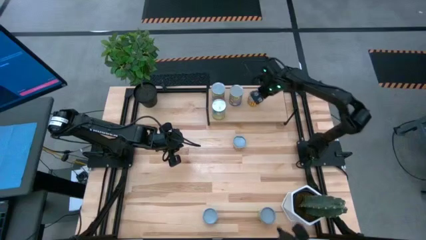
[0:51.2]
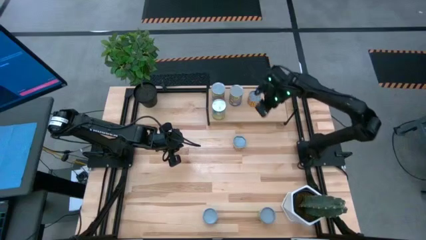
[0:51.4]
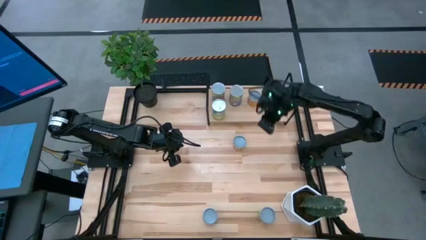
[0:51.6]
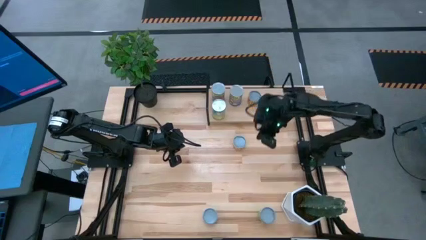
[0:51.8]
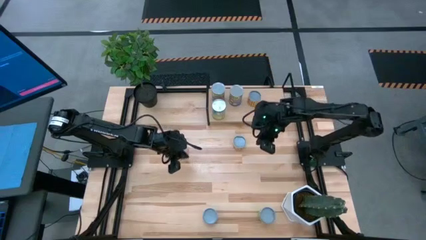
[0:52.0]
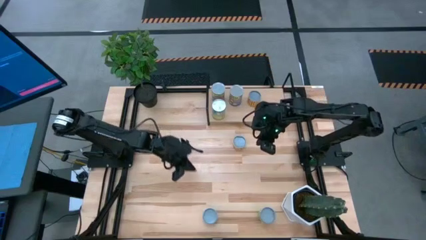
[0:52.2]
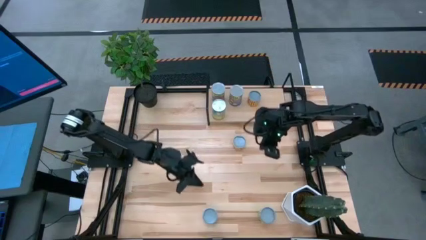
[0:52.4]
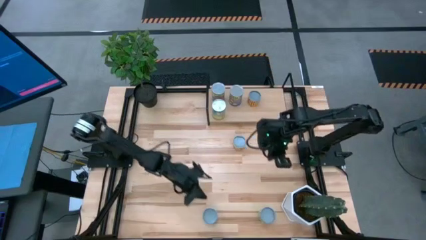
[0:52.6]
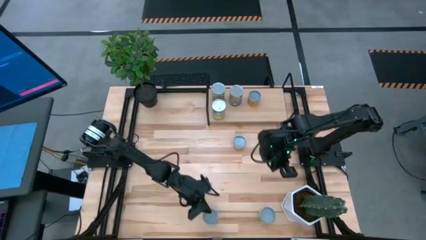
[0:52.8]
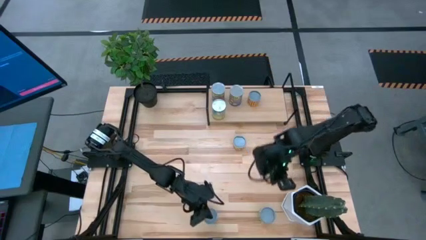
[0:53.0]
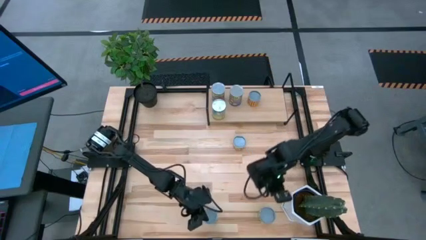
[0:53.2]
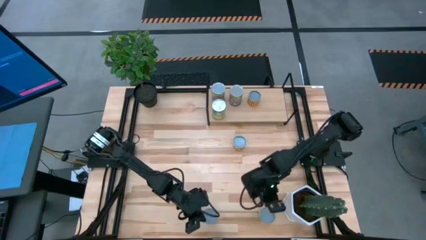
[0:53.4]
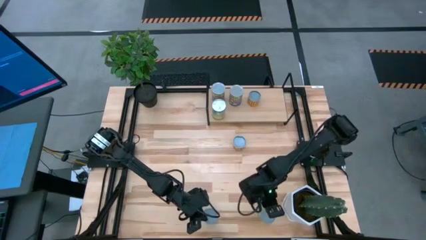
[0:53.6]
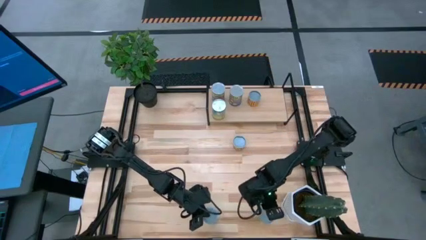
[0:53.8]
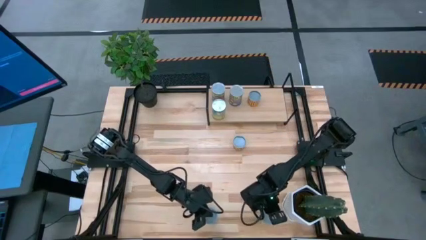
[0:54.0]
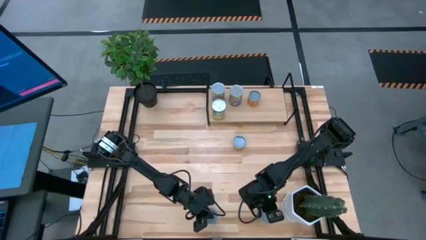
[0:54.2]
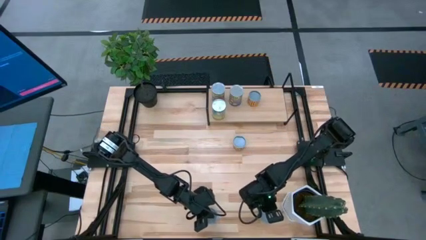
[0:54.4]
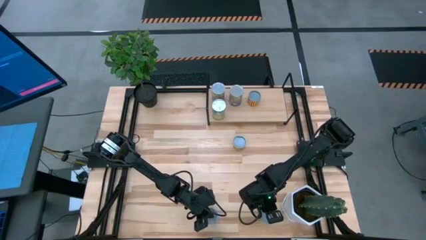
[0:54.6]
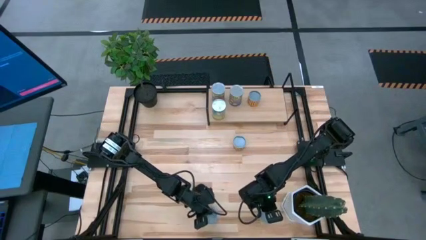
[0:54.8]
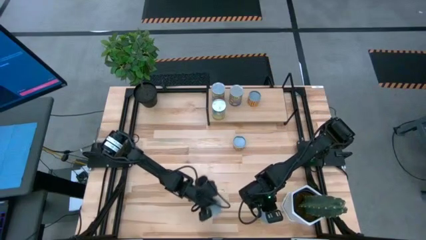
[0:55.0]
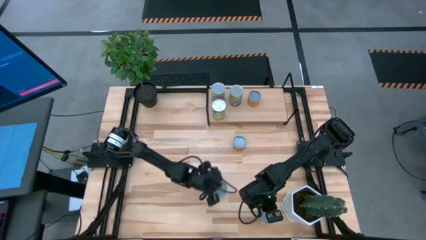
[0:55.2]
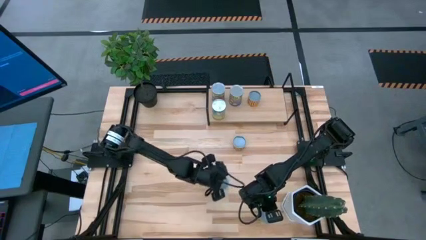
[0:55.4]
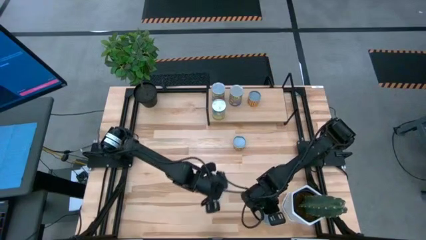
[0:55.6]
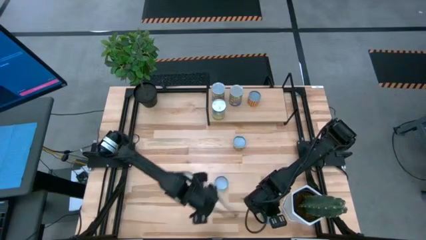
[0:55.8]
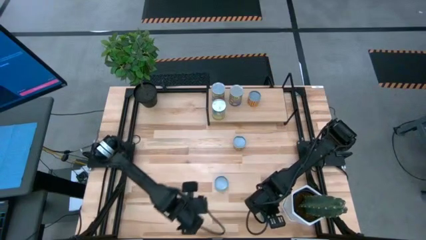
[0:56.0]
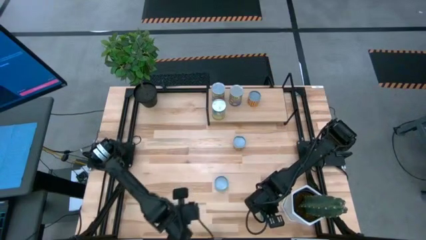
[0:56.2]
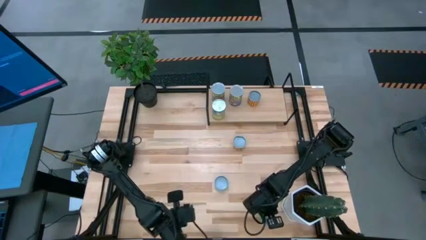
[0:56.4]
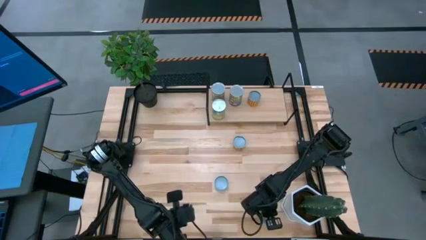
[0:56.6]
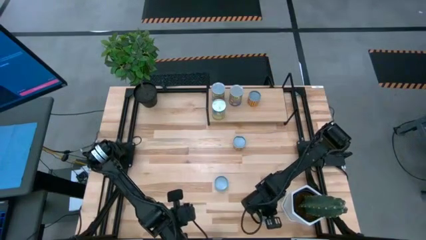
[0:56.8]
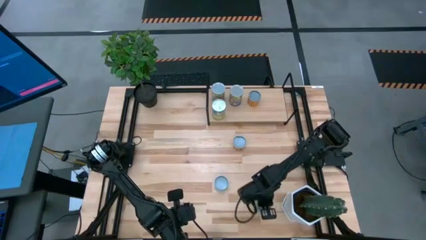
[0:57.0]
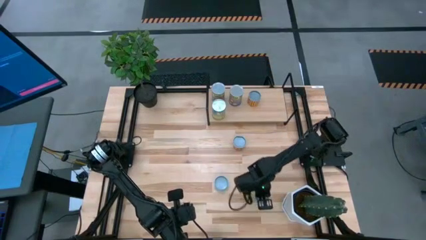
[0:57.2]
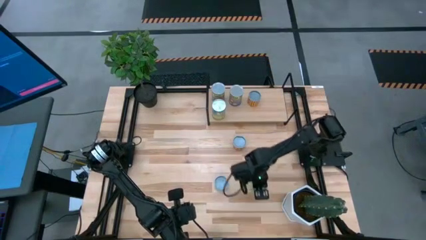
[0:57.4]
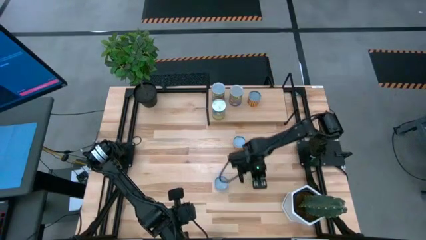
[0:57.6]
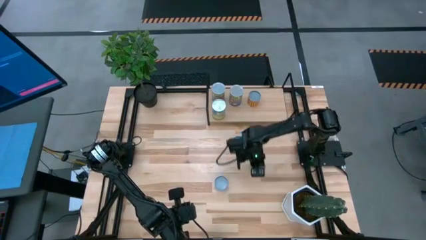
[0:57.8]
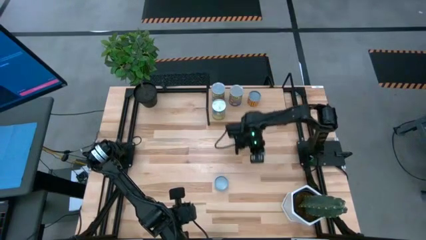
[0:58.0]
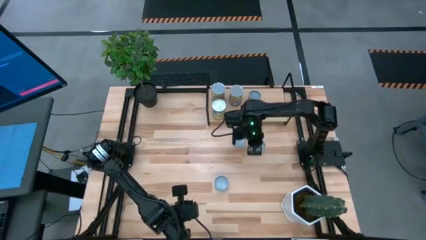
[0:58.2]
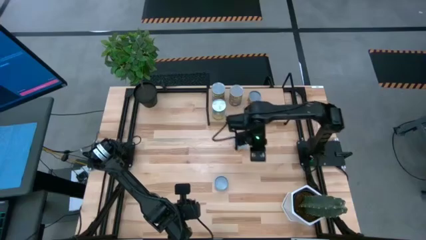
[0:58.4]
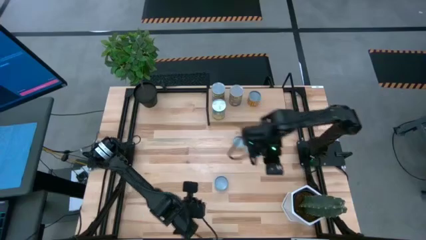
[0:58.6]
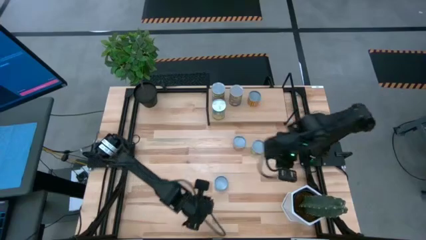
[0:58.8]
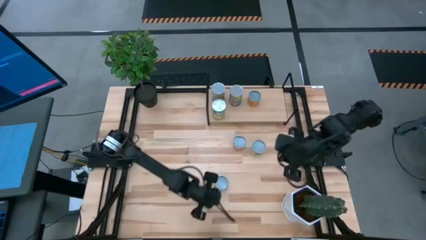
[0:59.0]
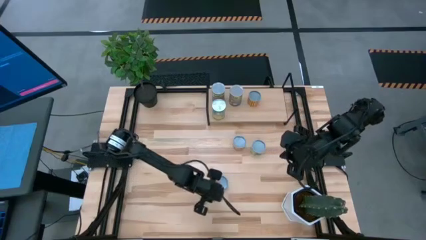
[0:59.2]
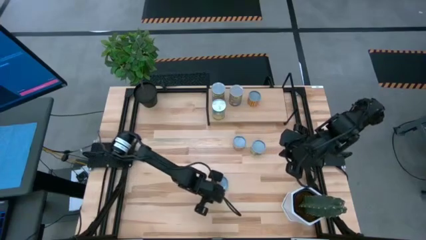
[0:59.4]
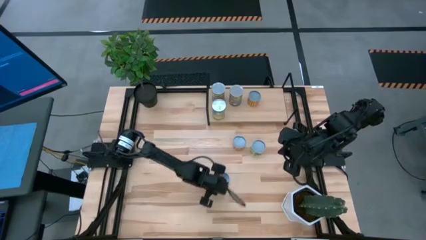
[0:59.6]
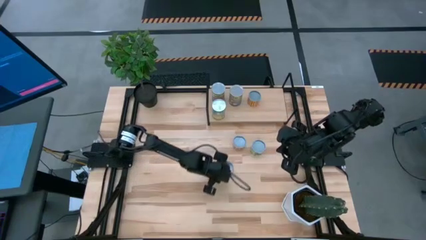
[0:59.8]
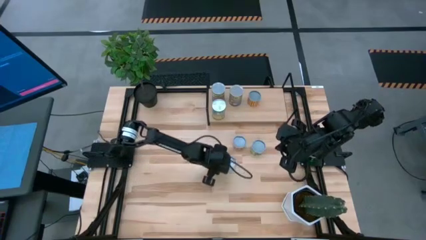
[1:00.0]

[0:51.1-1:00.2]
Task: Pick and place cans onto a shelf
Move the canned goods to the center of the table

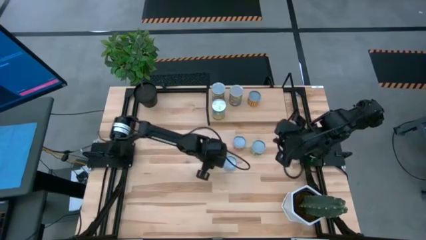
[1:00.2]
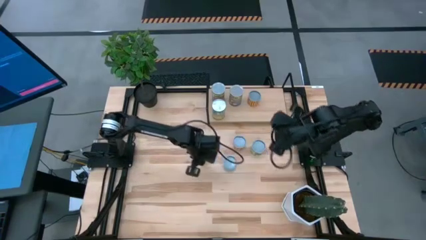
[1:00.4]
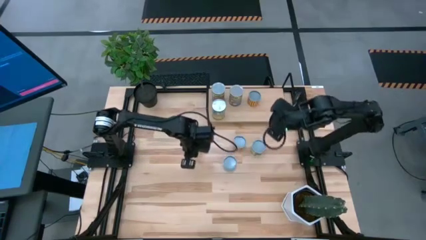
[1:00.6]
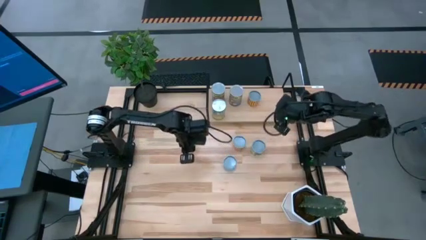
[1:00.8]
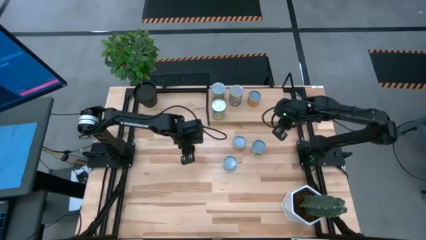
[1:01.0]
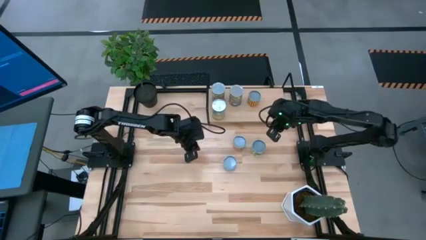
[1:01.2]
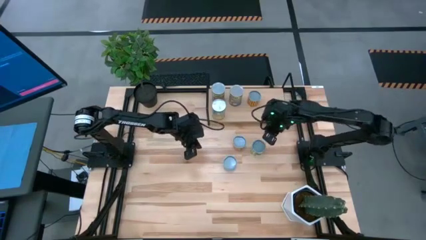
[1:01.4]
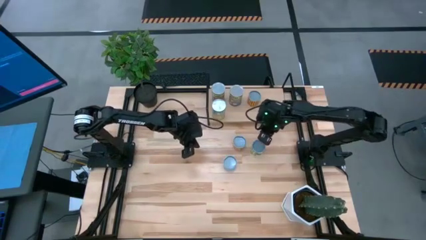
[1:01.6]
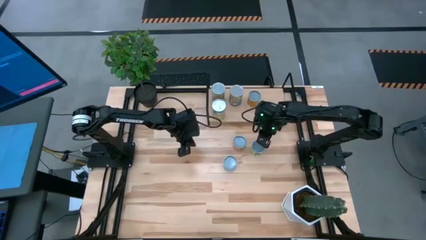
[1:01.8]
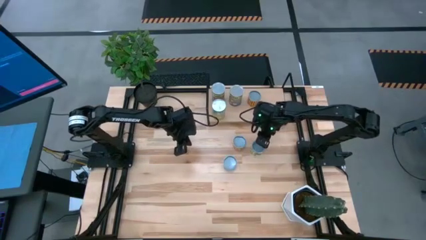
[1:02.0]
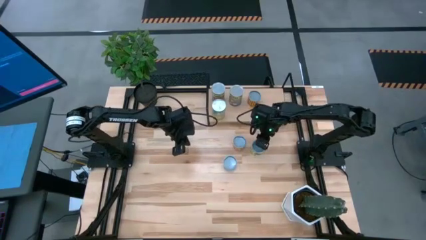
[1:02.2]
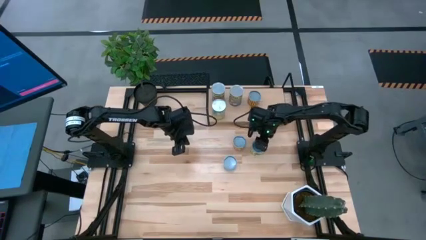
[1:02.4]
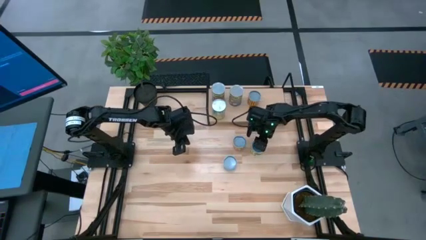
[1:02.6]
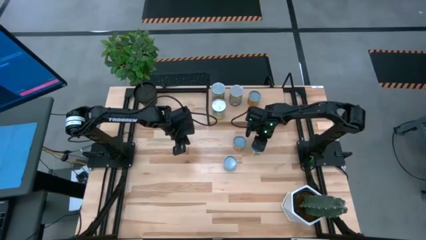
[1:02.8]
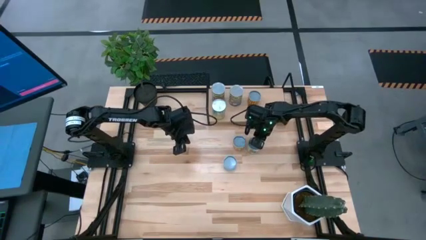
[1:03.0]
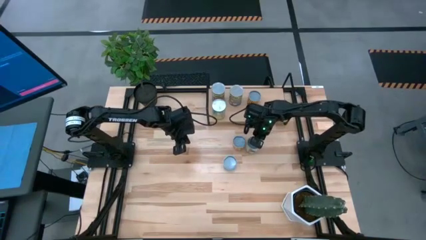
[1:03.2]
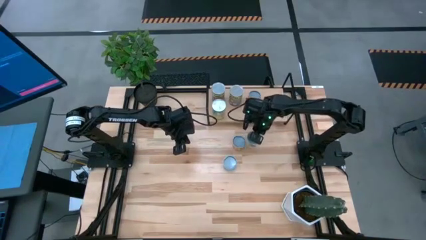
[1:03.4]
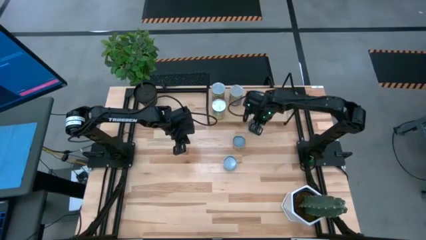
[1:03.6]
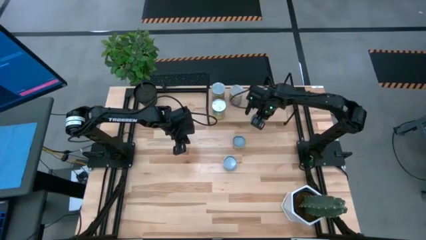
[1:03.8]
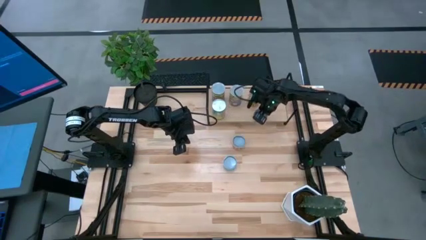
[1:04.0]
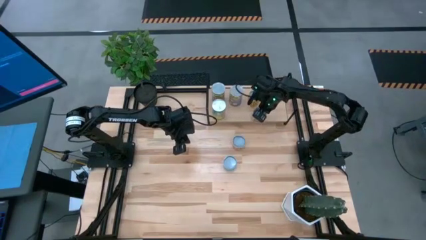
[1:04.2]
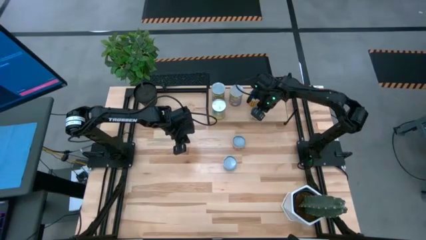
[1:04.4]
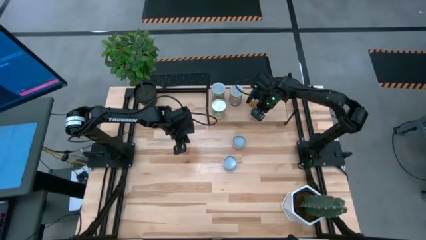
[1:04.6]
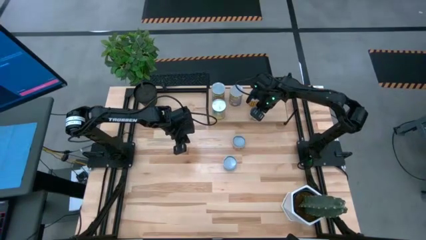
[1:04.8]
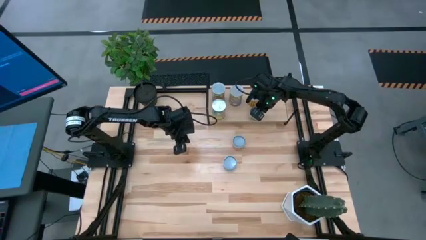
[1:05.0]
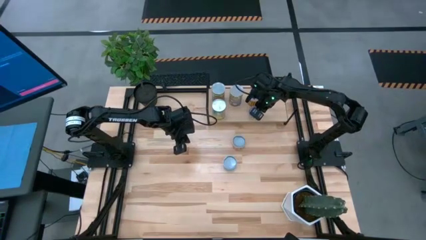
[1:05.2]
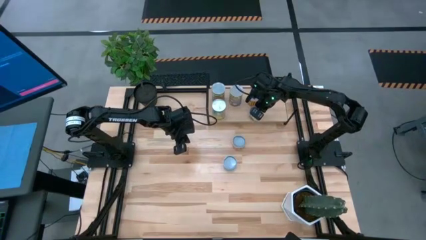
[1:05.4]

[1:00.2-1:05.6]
Put the canned peas on the shelf
